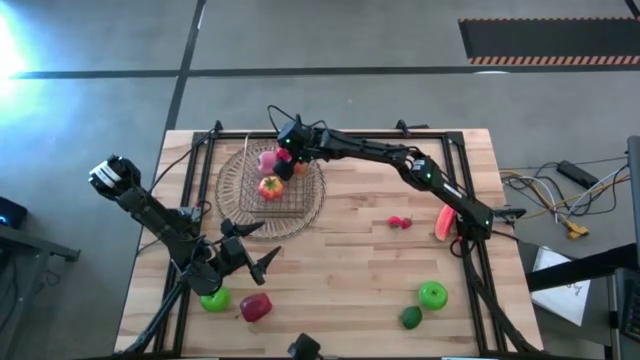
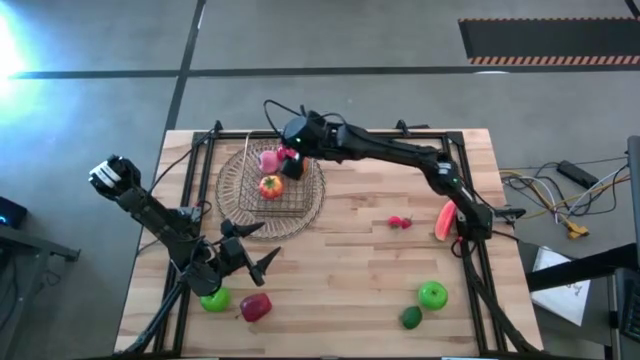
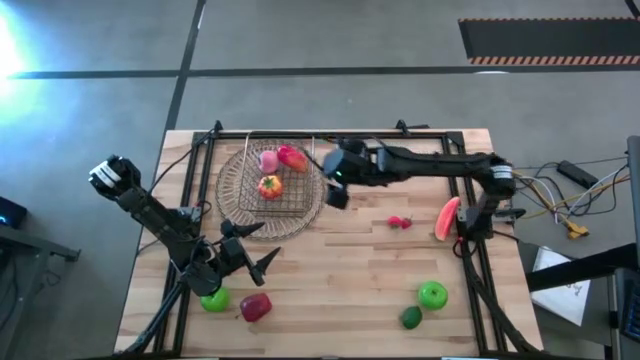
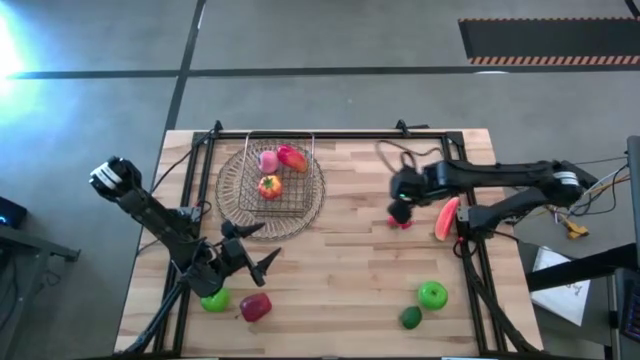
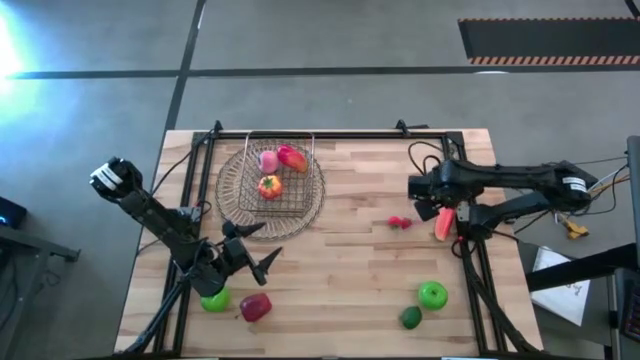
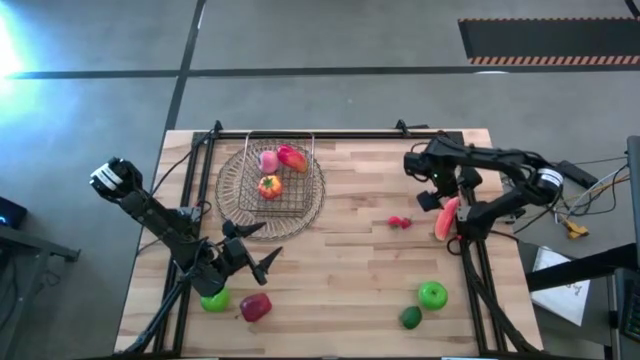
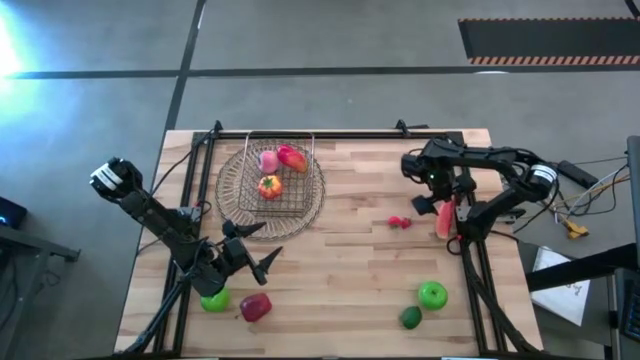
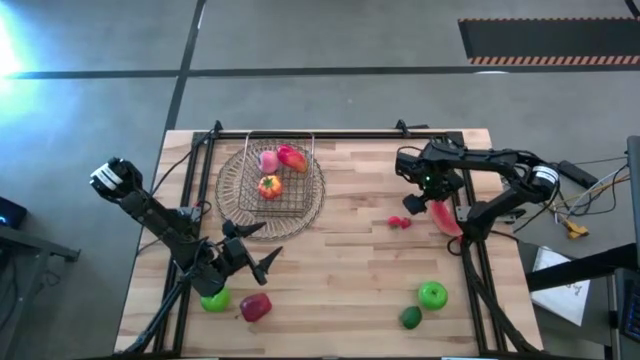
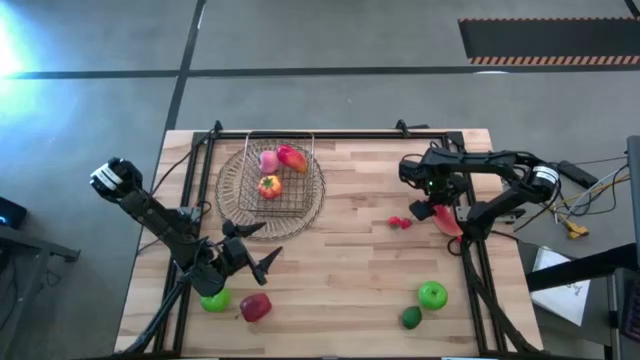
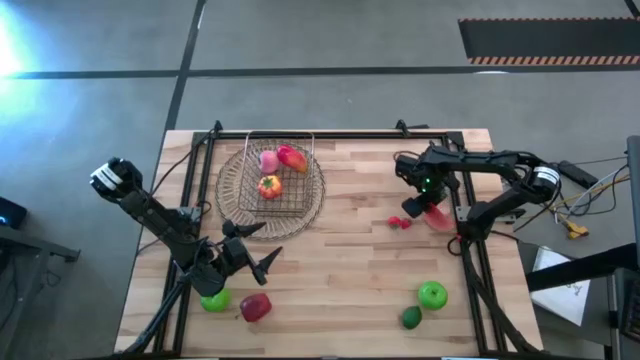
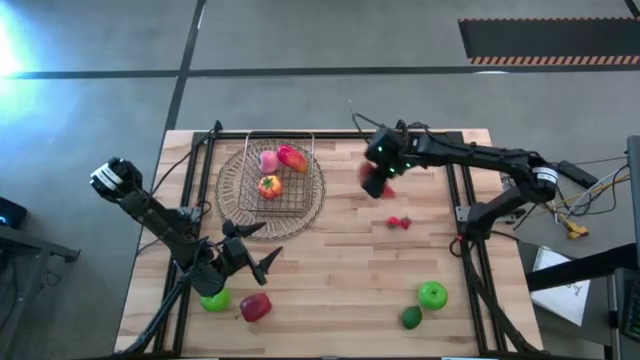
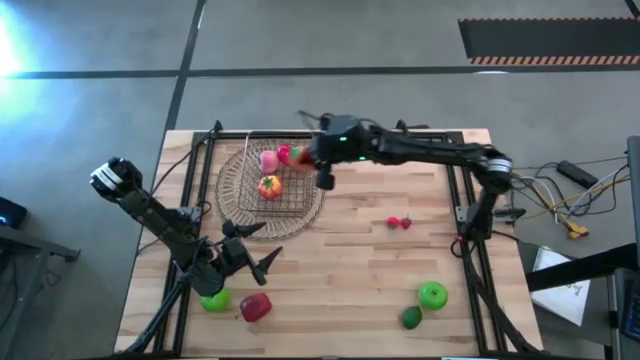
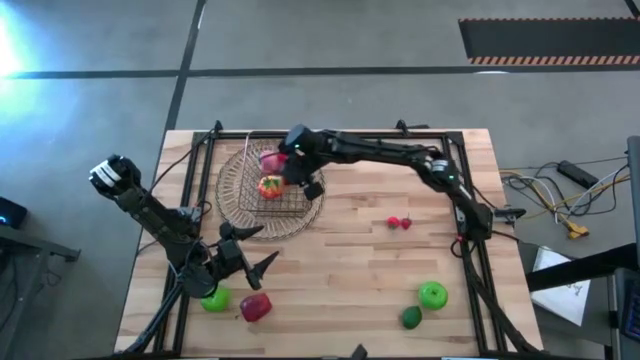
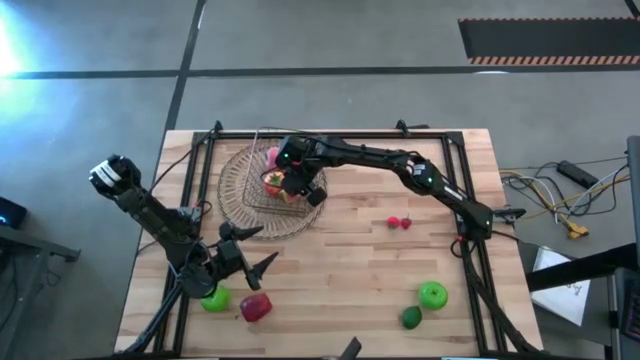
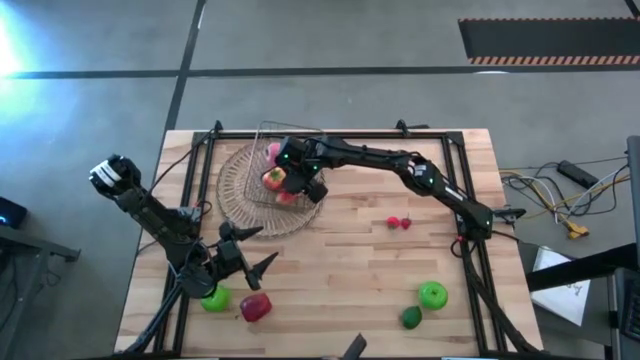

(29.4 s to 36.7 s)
Task: Build produce basket
Put the watermelon into the basket

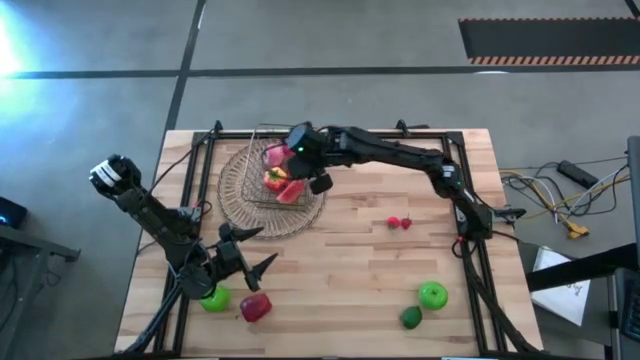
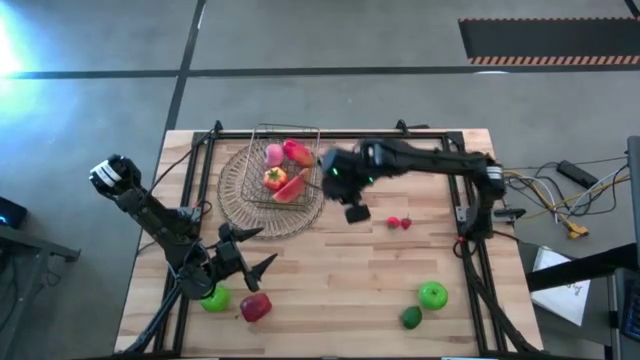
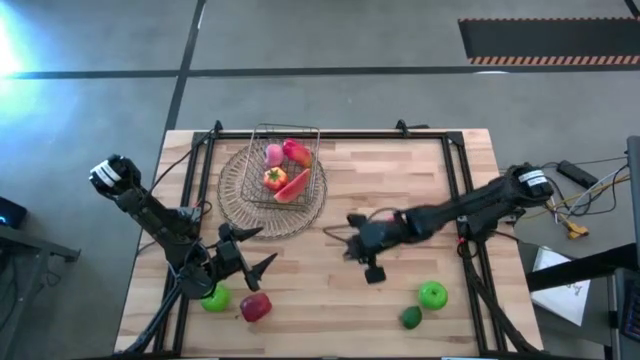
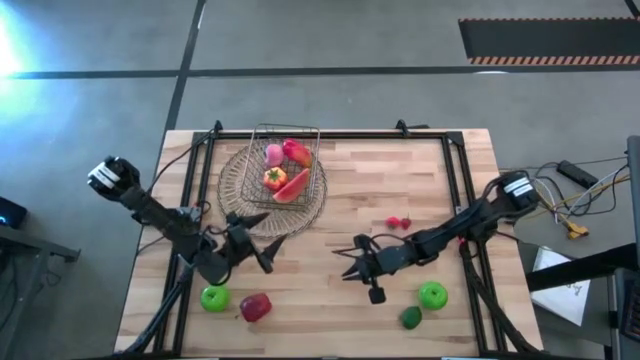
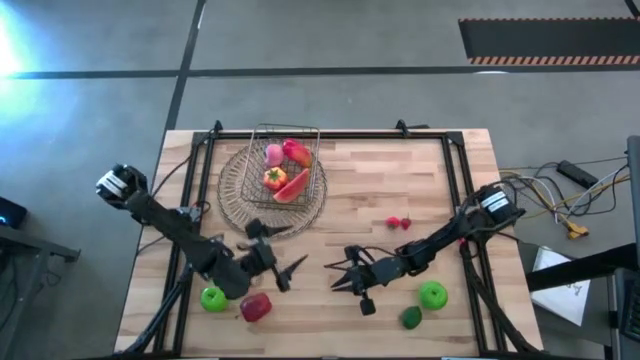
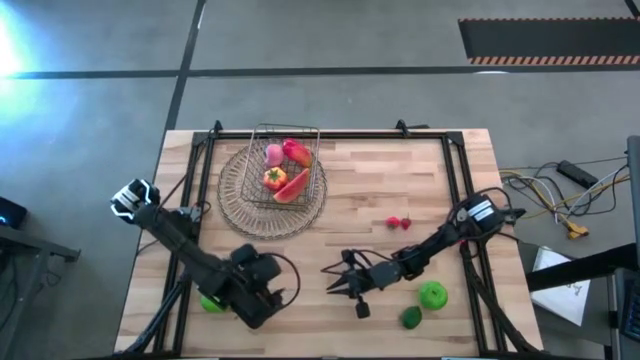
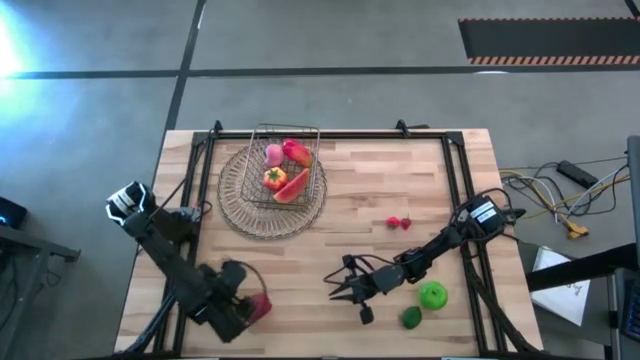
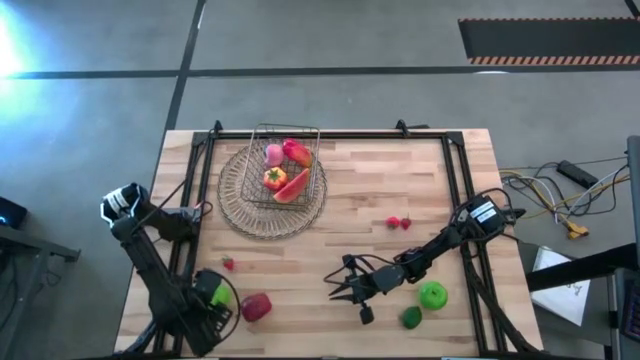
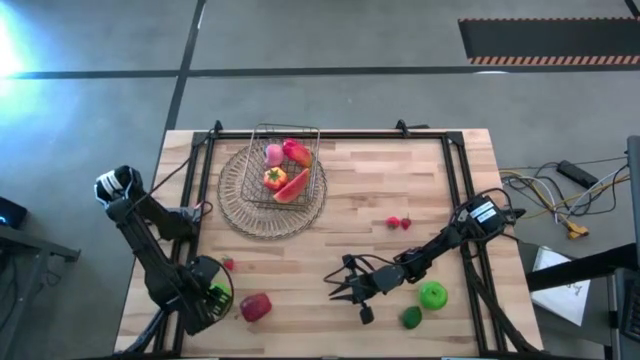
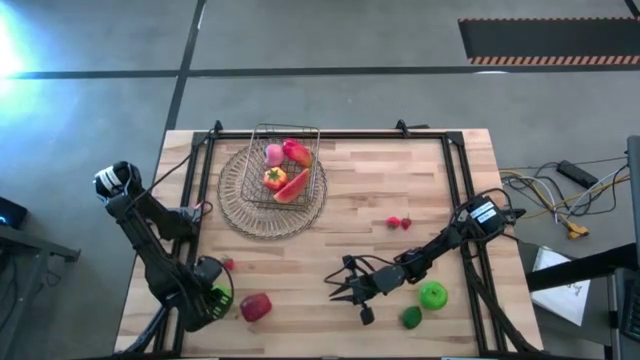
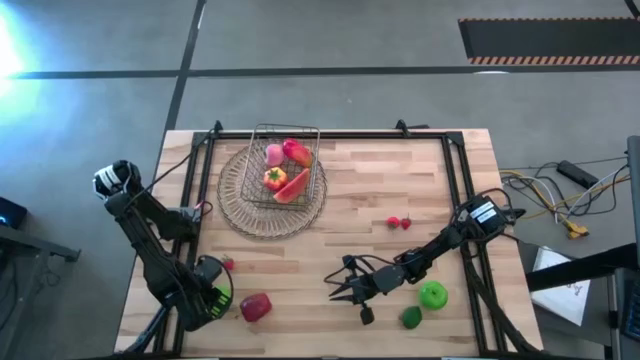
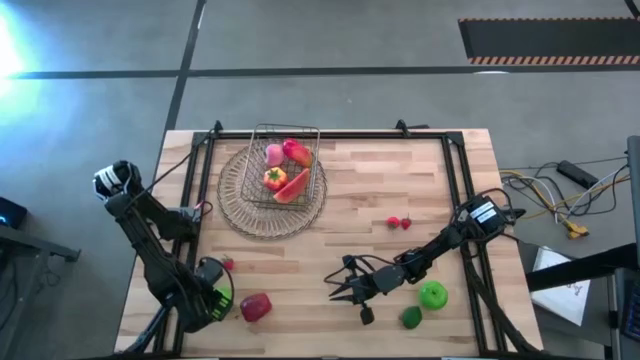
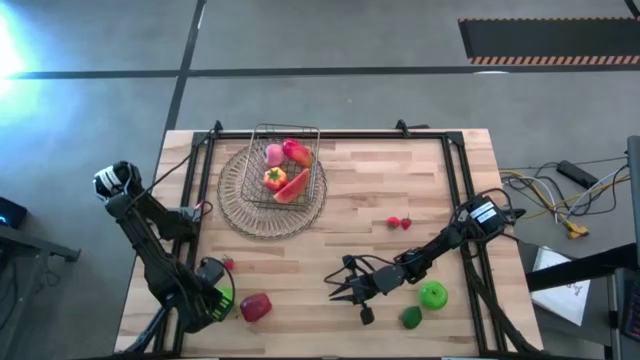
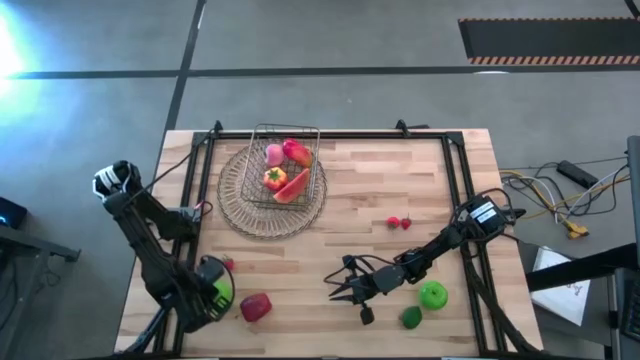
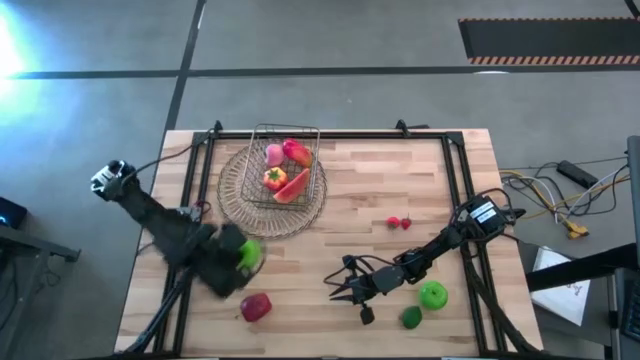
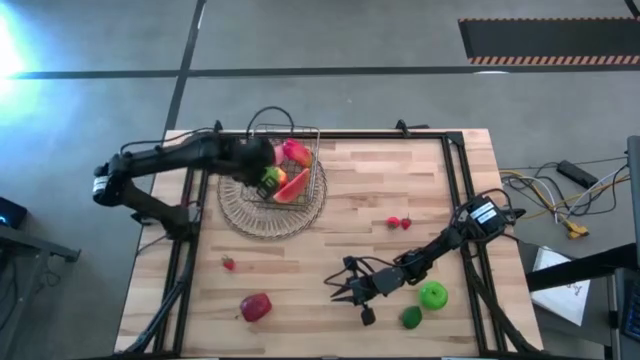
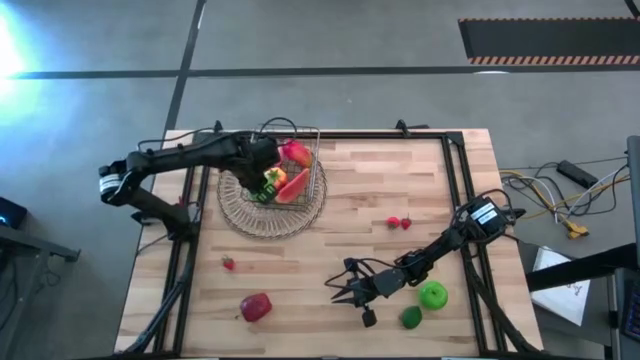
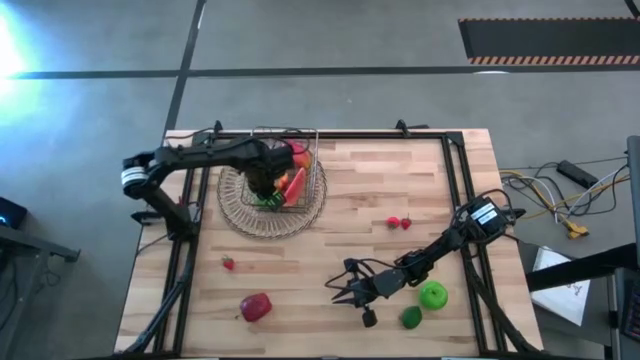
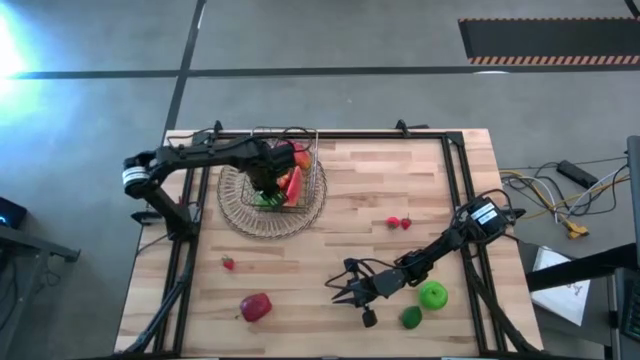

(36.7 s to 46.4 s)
Put the left green apple into the basket

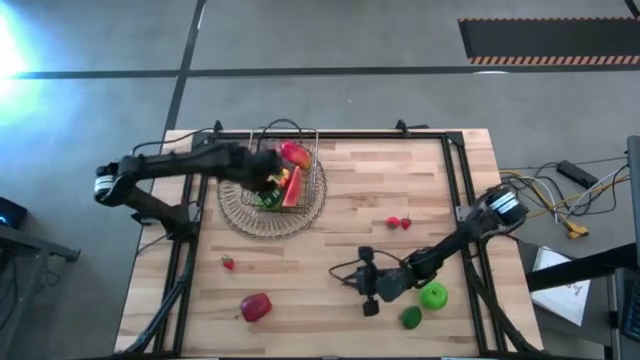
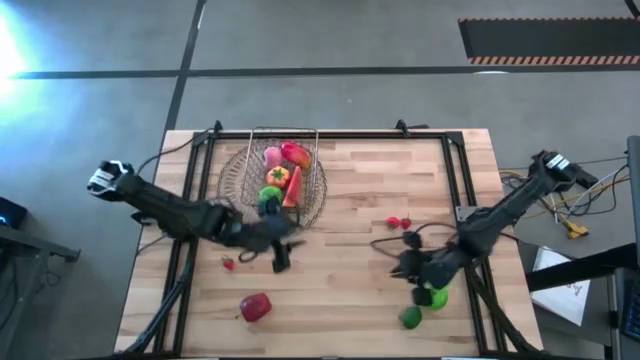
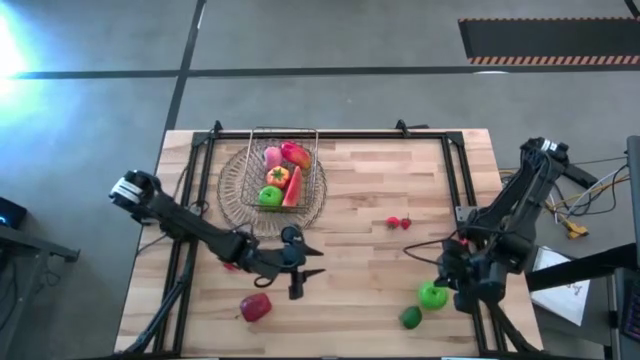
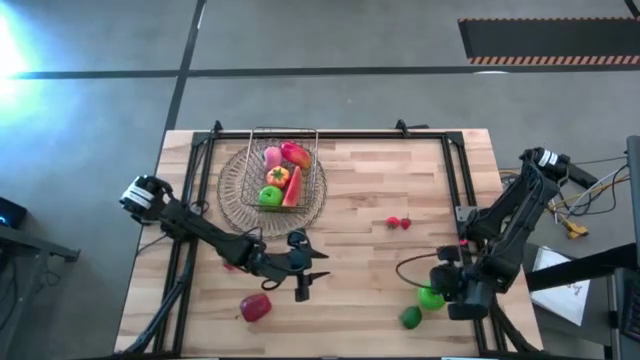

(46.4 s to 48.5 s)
Put the green apple into the basket

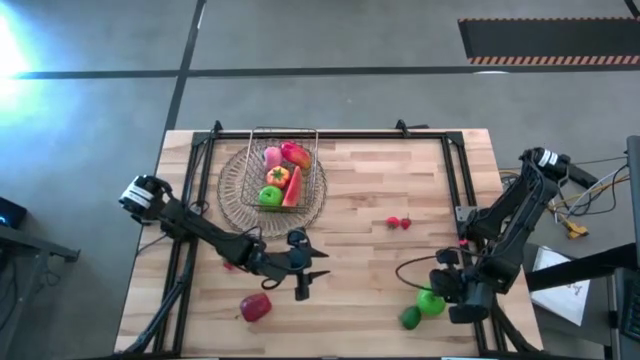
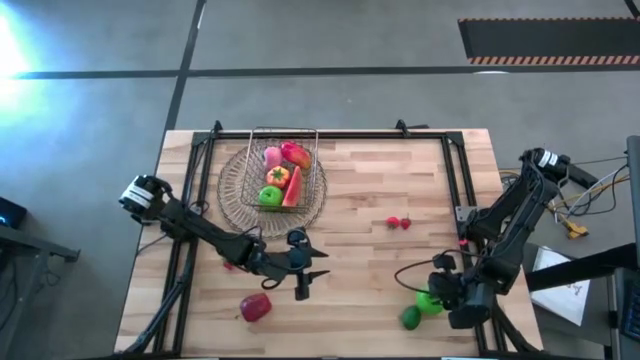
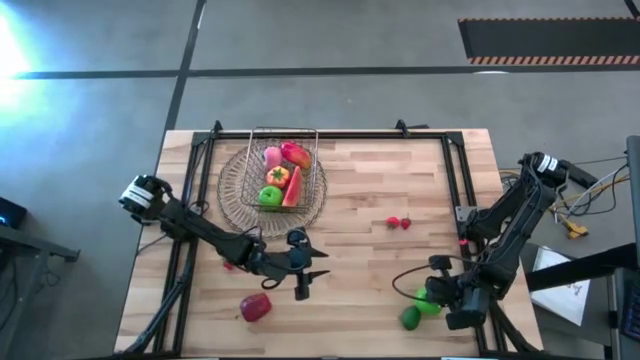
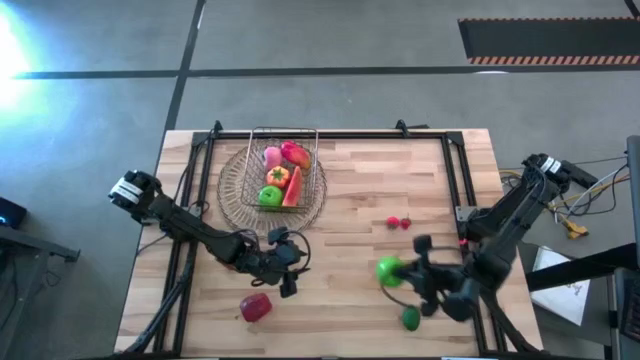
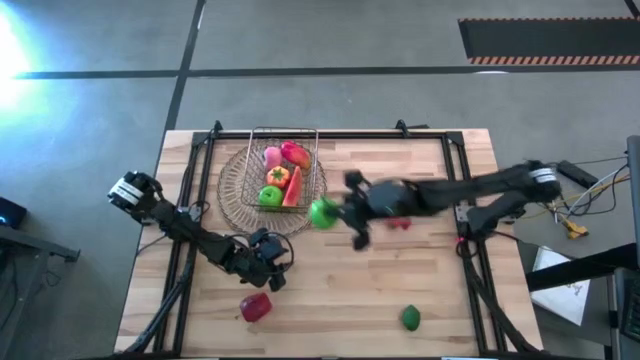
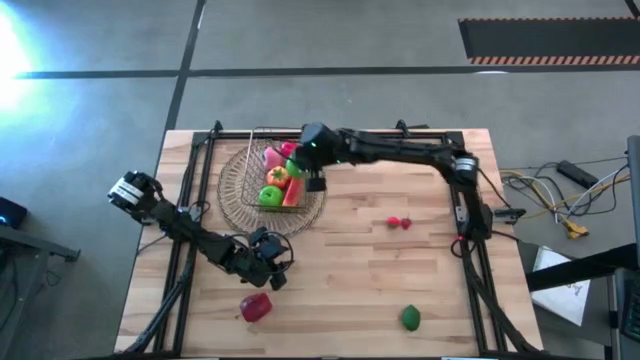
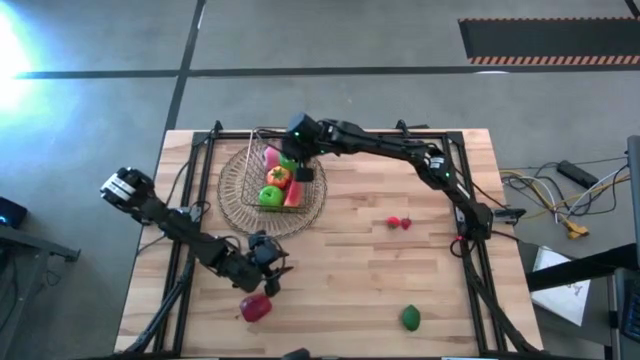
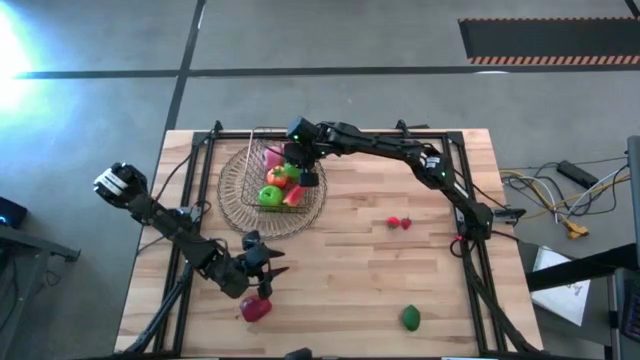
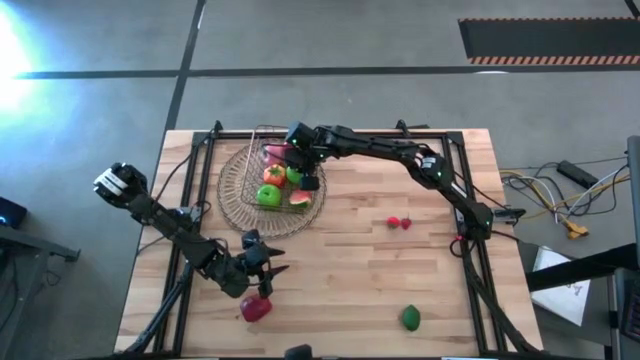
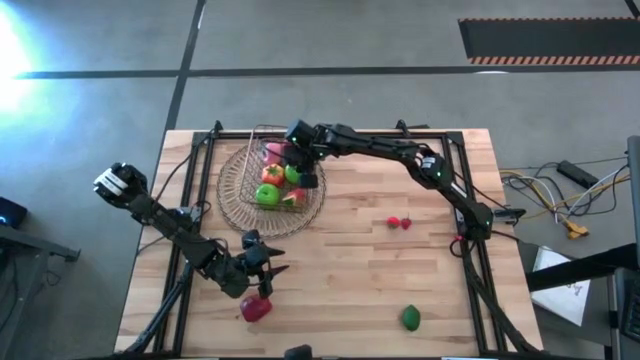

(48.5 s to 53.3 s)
Put the green apple into the basket
